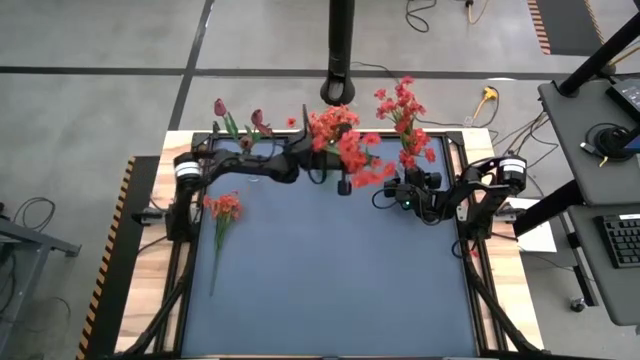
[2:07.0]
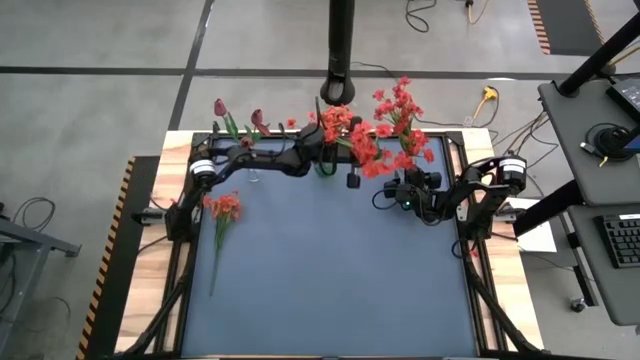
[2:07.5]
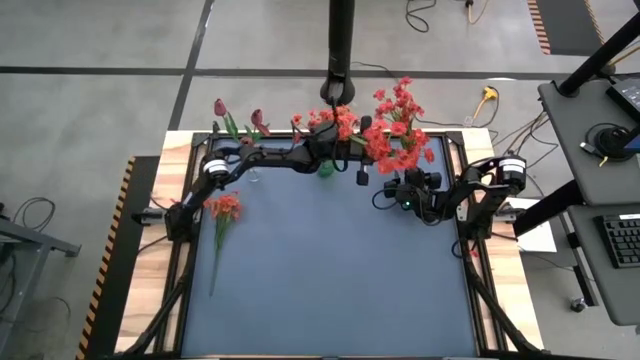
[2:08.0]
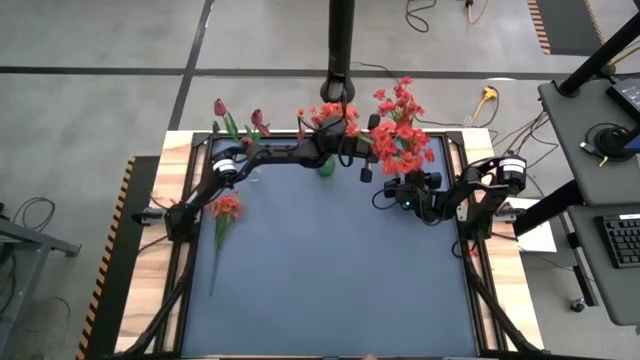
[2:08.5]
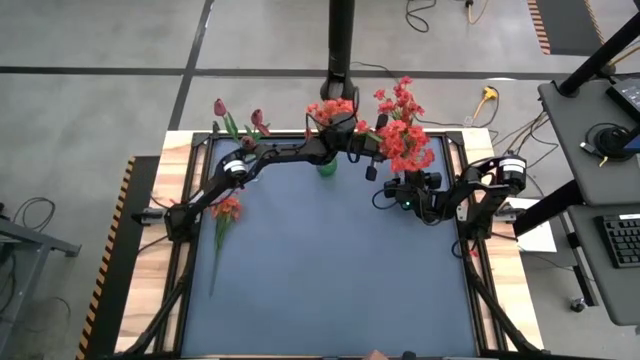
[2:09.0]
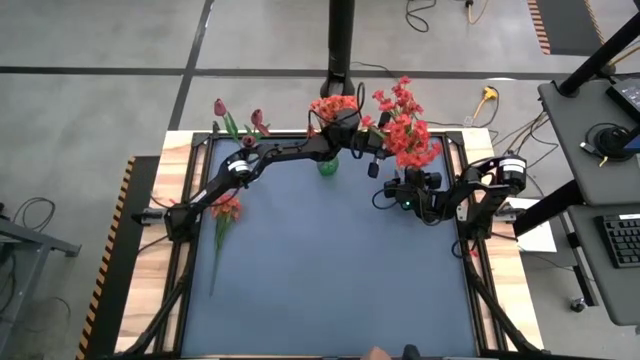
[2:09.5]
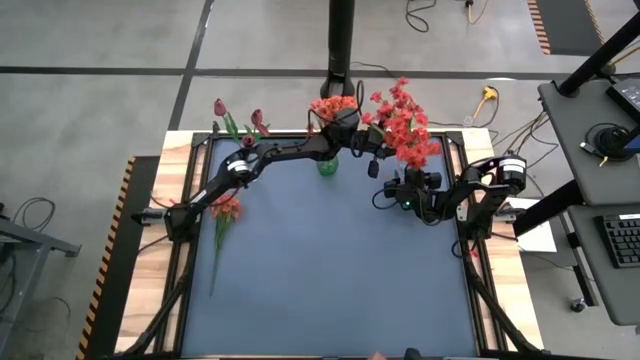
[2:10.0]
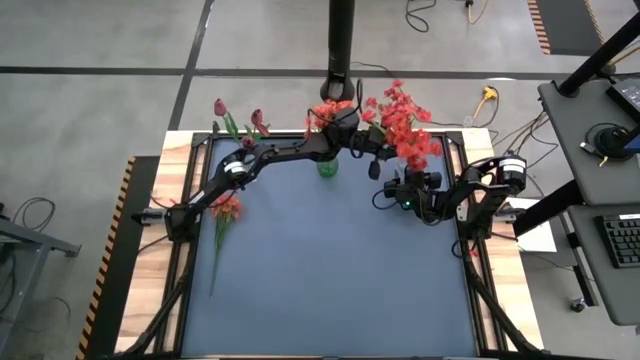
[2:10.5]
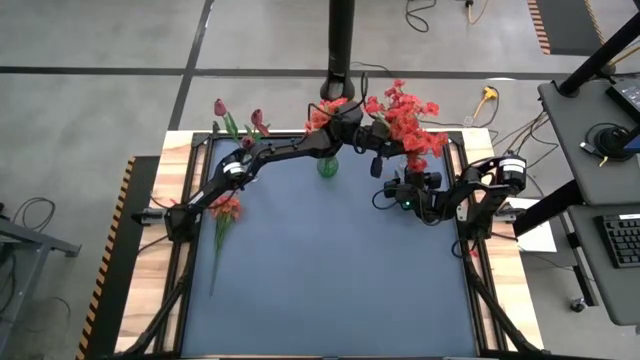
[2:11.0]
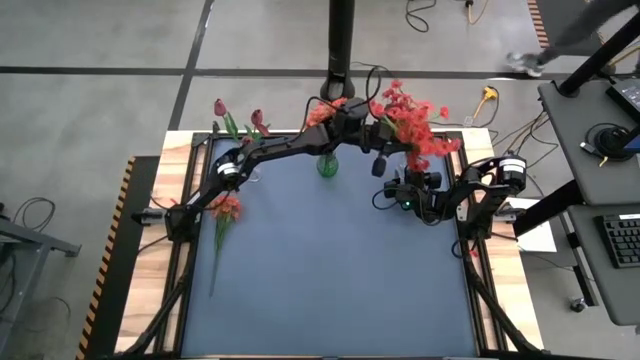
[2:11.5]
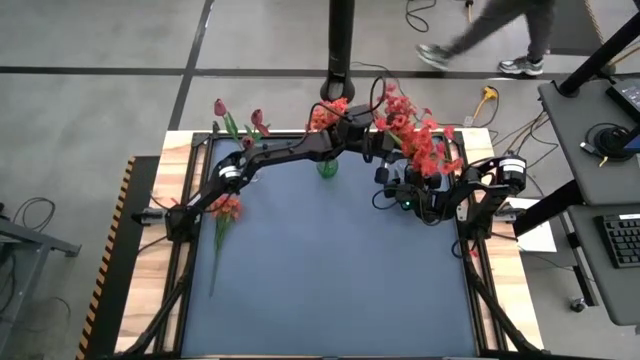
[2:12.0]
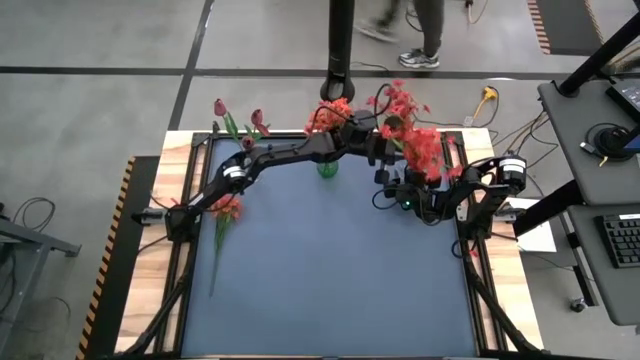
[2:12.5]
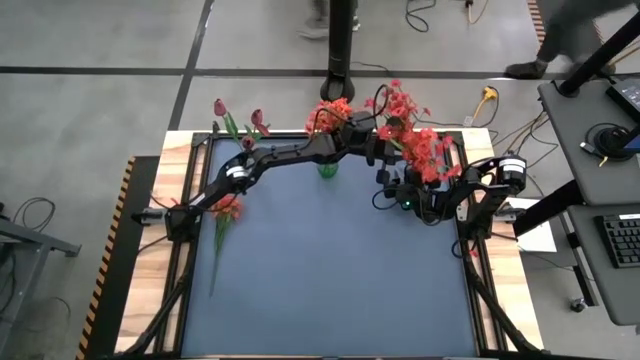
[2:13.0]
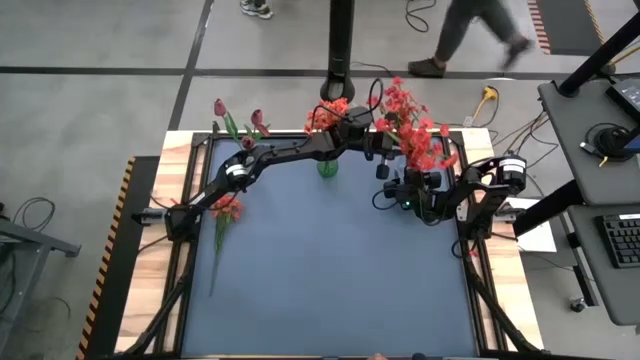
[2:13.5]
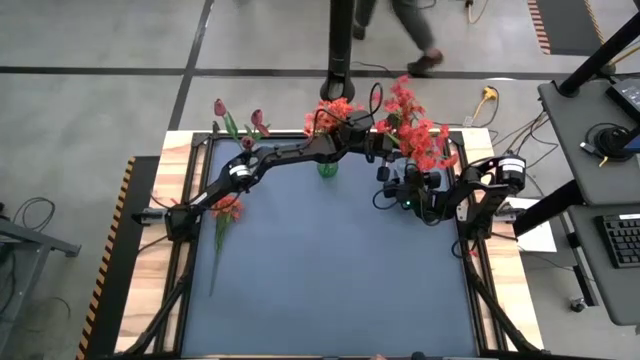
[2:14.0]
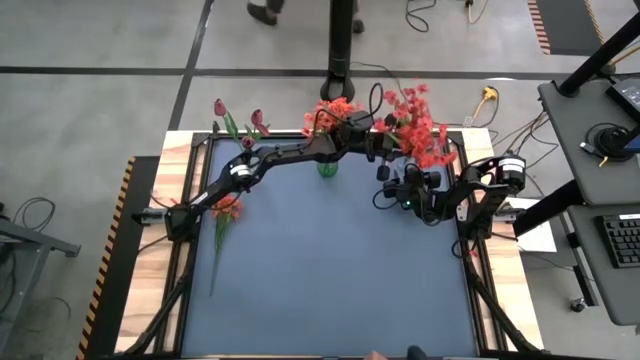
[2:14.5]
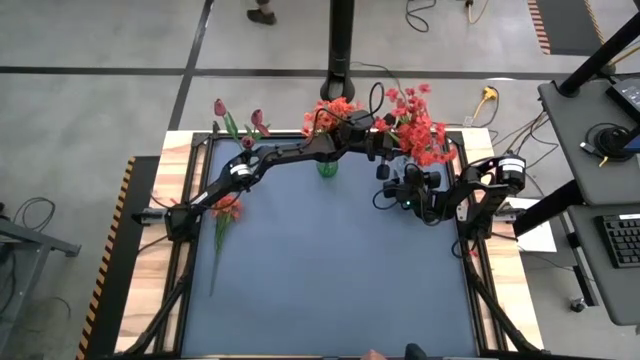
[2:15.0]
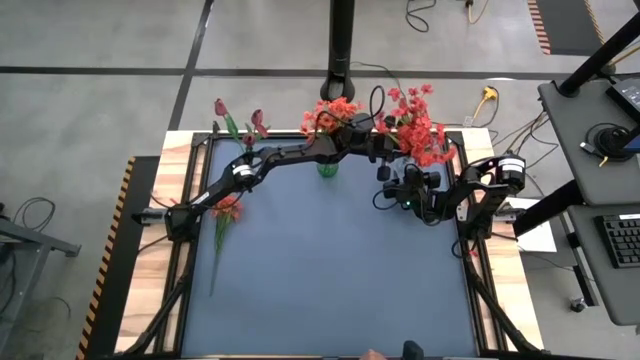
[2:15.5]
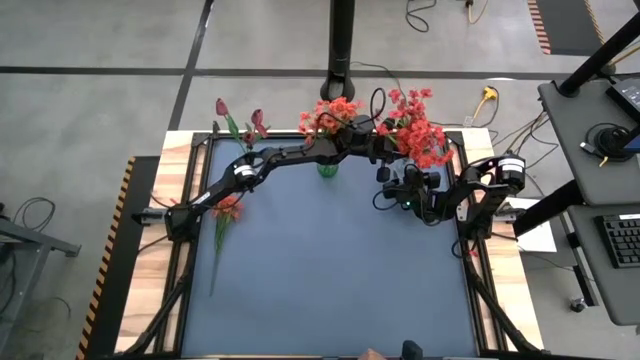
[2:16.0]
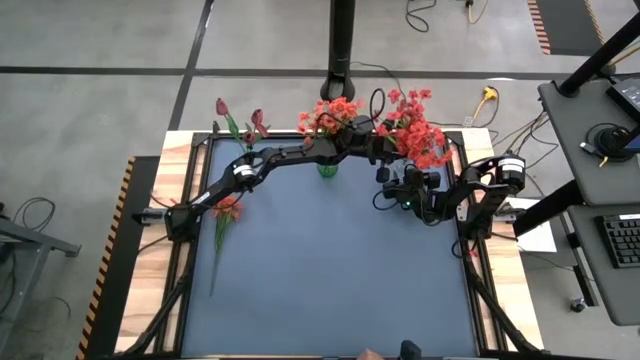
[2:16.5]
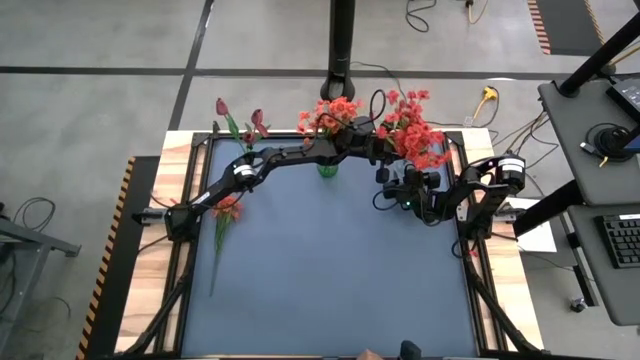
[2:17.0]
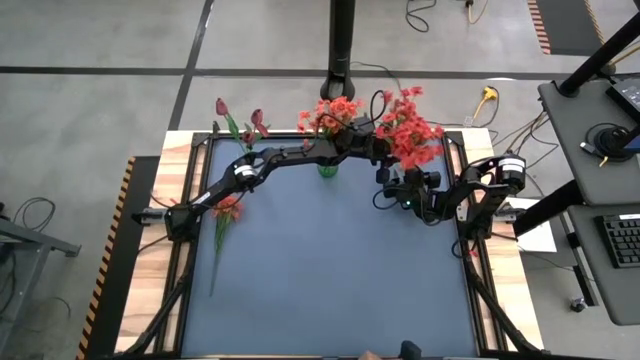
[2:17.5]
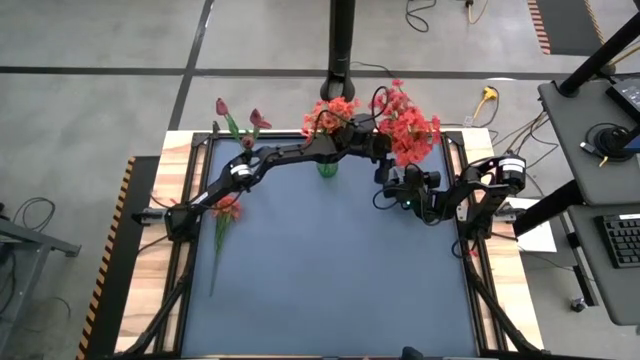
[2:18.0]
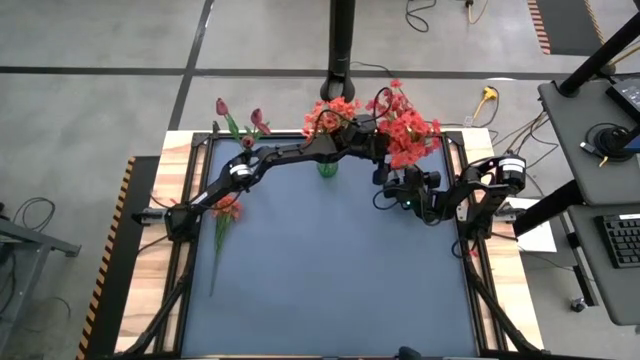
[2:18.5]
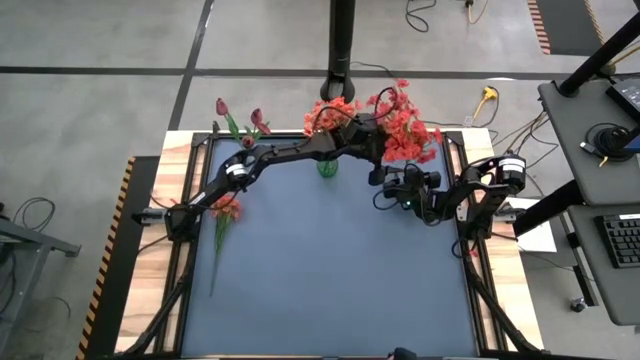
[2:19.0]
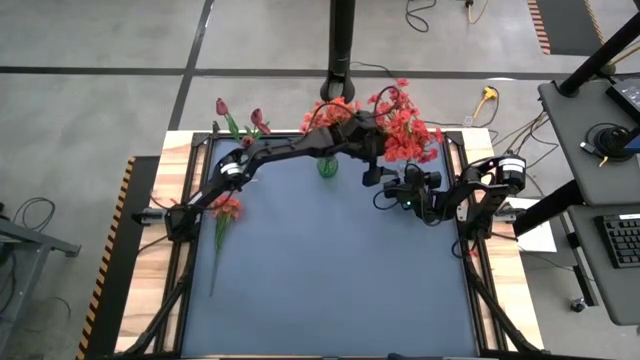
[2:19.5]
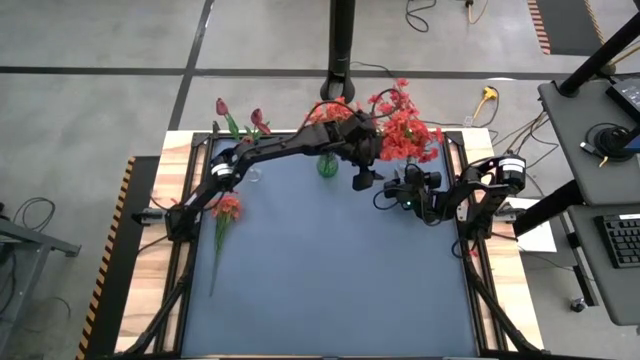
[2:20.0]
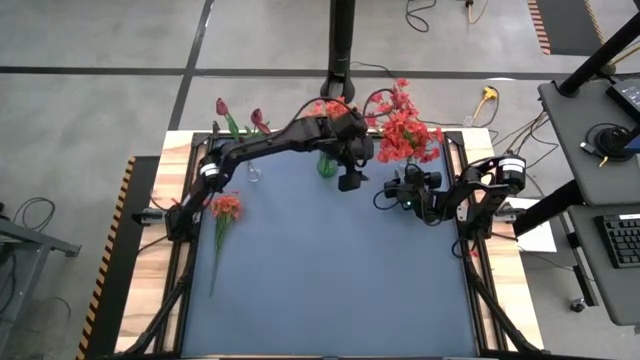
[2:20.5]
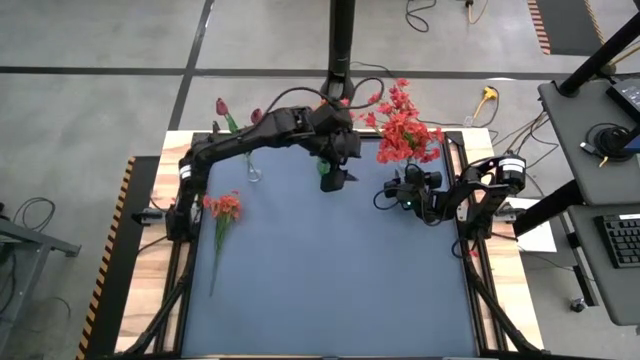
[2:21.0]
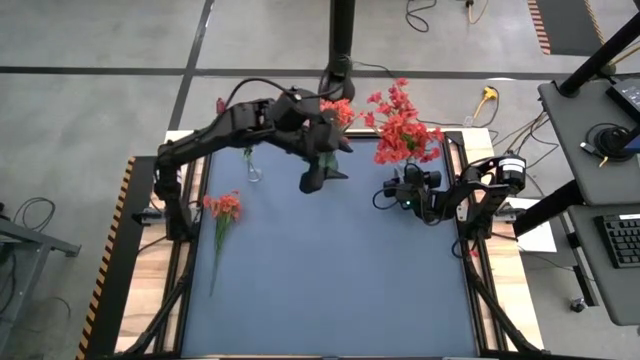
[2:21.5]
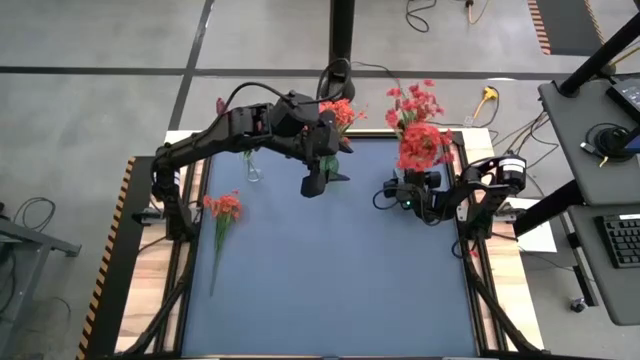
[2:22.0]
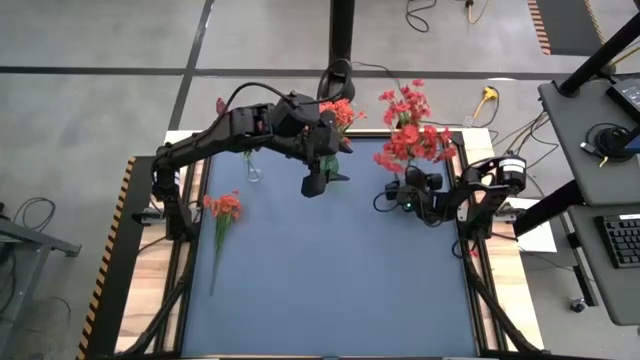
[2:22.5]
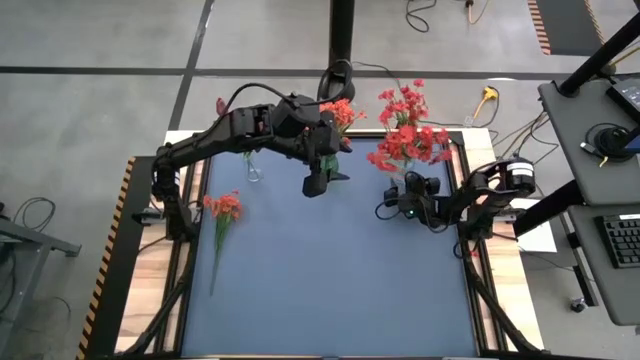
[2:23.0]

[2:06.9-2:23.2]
Task: Sort flowers into vase by color
Put the red flowers into the right transparent vase

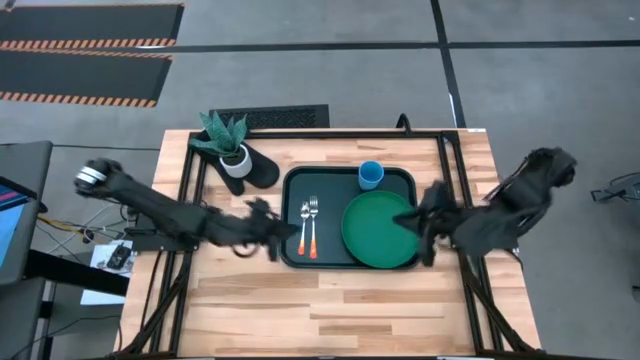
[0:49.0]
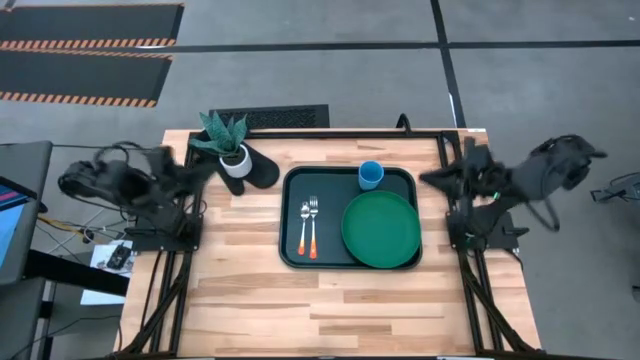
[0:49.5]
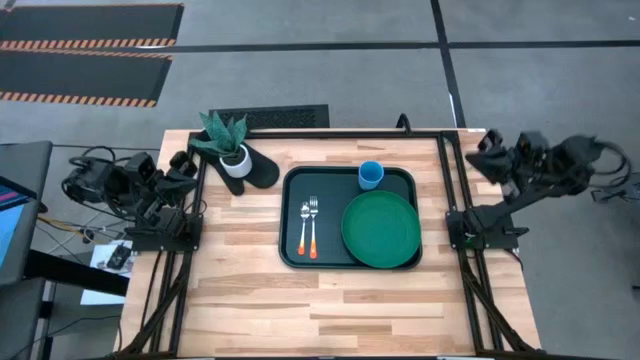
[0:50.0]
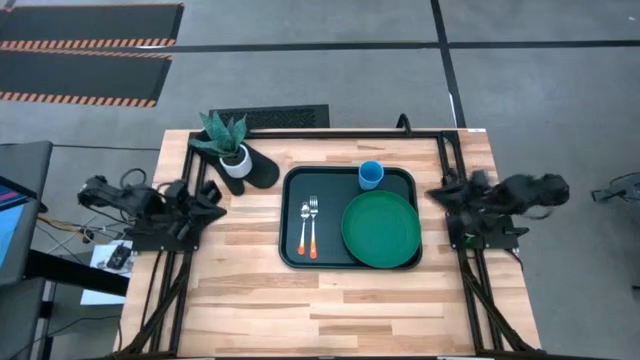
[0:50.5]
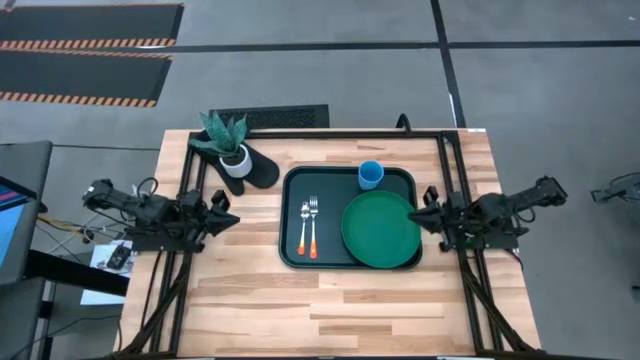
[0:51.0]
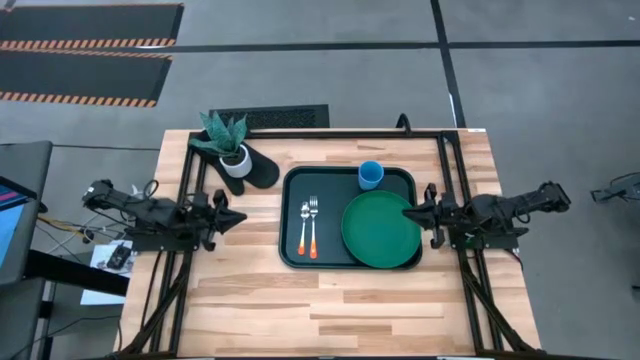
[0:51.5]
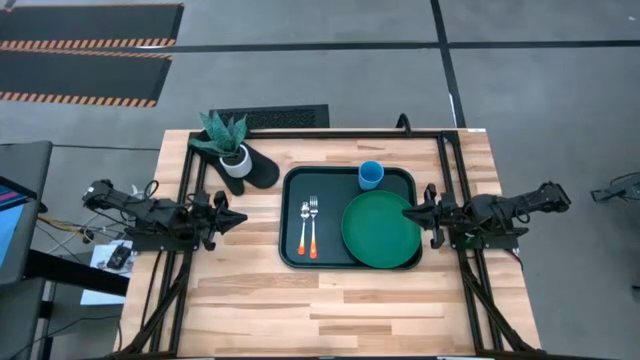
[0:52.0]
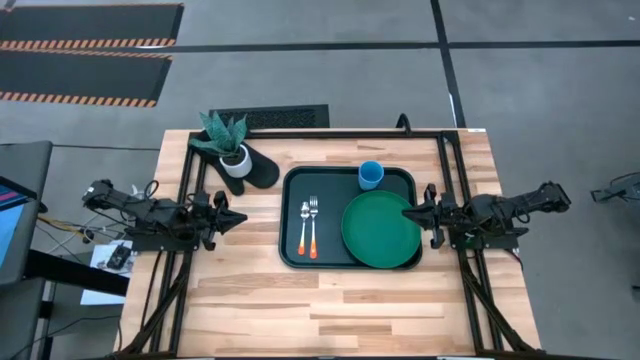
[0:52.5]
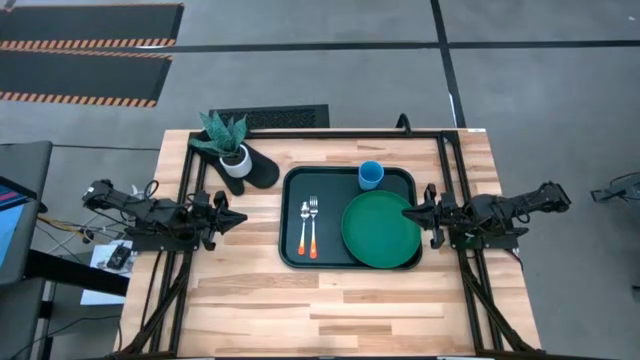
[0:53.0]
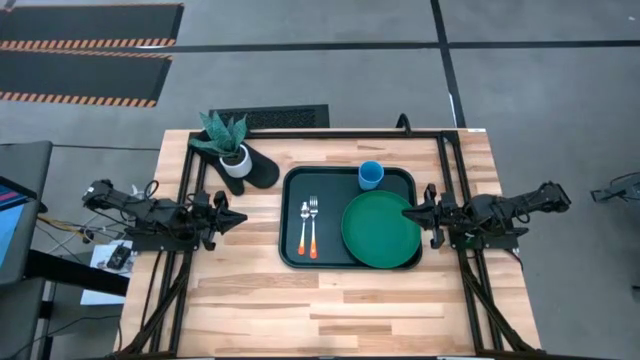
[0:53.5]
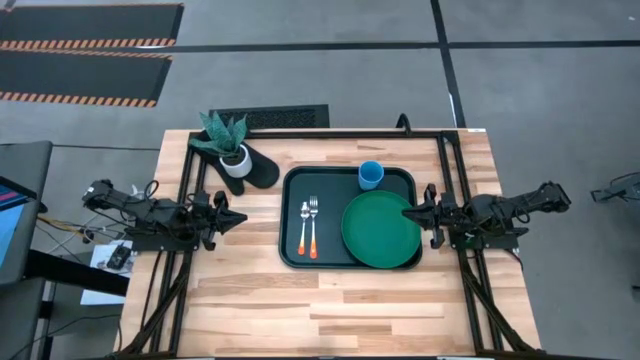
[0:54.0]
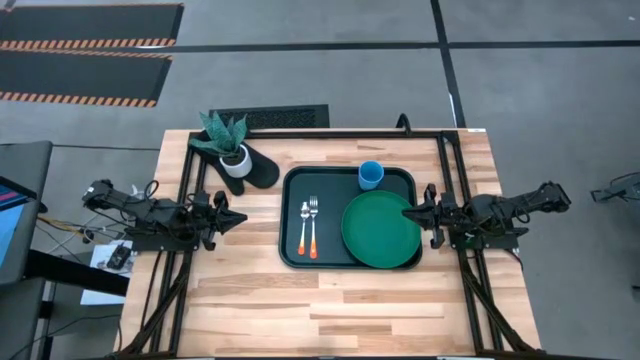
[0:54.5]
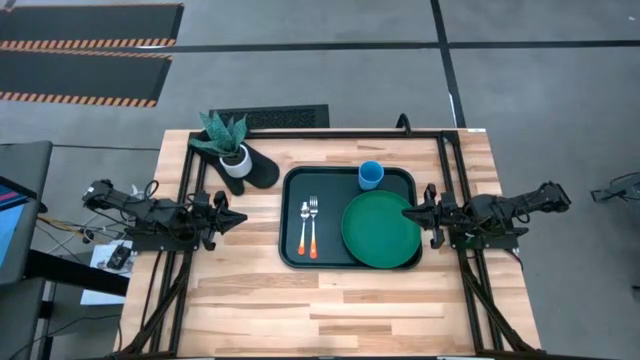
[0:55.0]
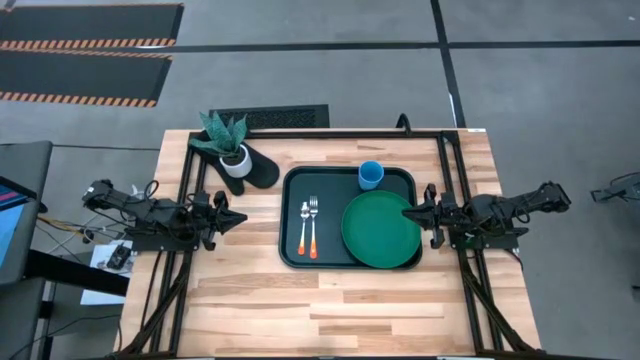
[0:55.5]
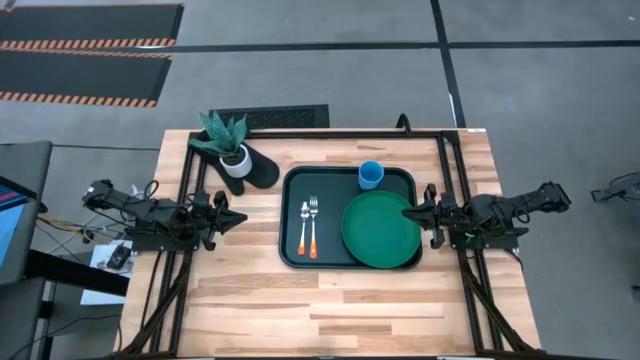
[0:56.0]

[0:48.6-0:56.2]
Task: Pick and place plate/cup/fork/spoon on tray
Return to Home Position
